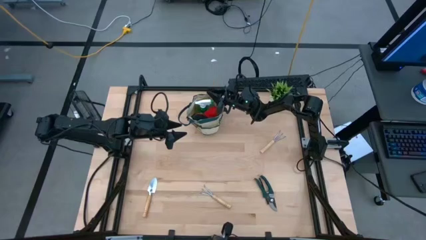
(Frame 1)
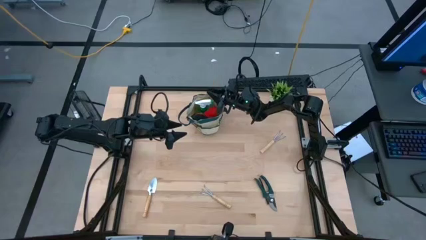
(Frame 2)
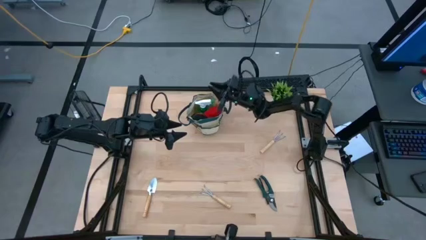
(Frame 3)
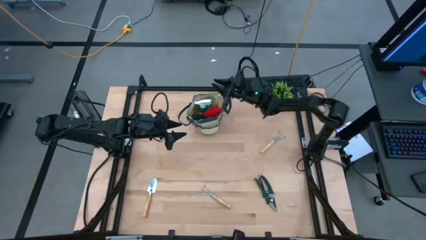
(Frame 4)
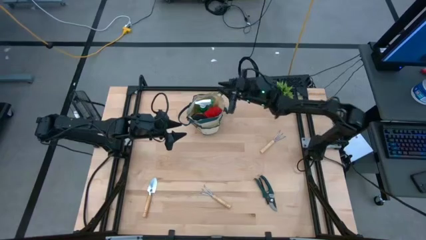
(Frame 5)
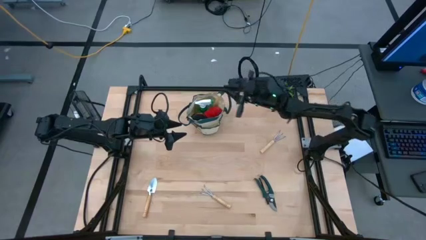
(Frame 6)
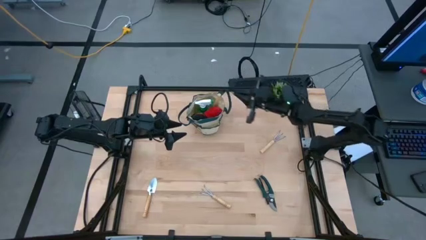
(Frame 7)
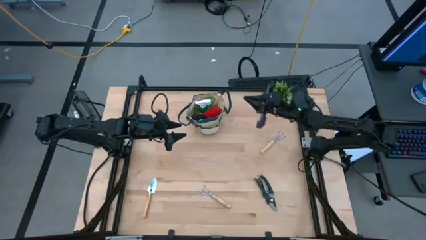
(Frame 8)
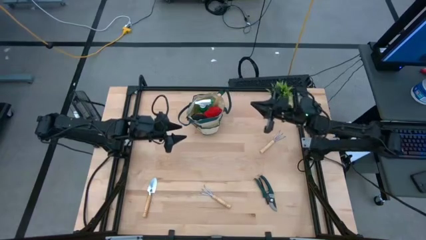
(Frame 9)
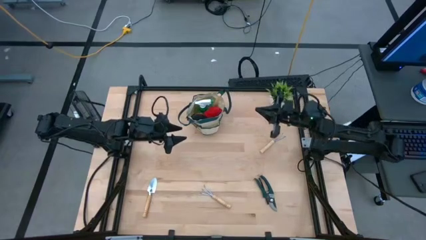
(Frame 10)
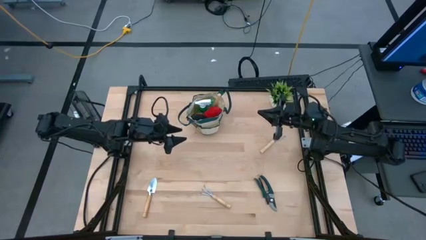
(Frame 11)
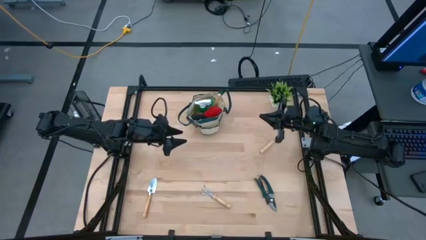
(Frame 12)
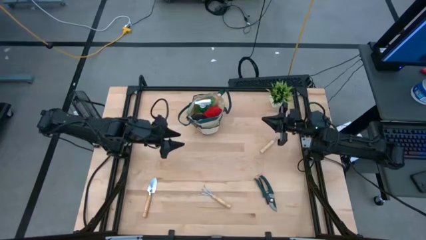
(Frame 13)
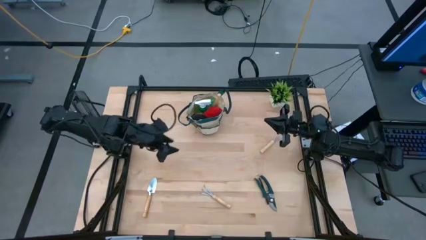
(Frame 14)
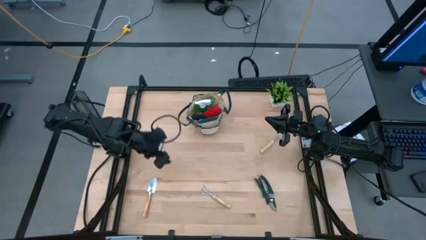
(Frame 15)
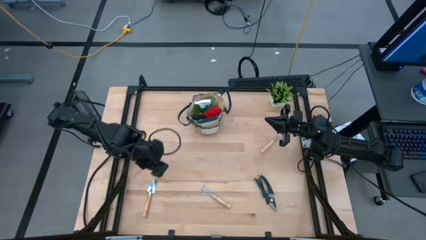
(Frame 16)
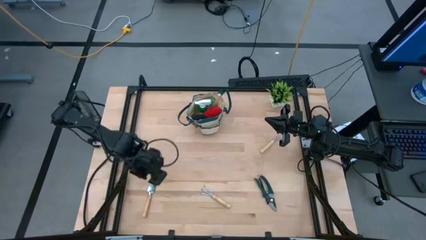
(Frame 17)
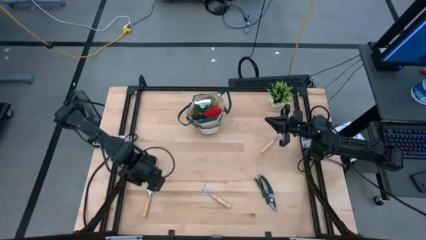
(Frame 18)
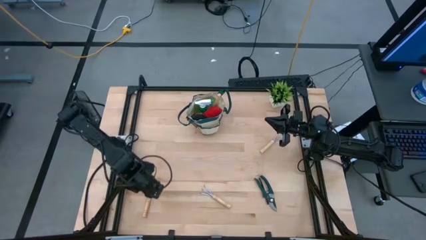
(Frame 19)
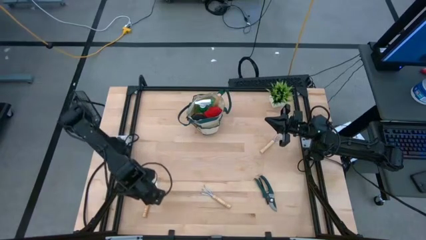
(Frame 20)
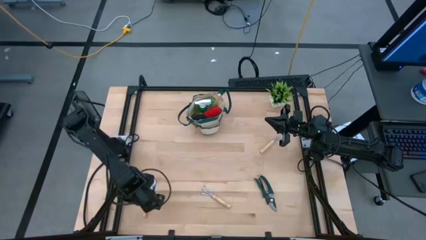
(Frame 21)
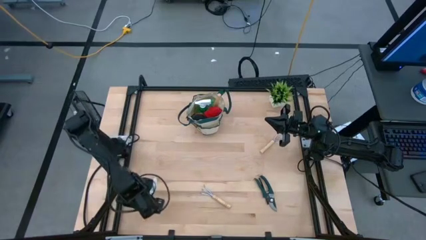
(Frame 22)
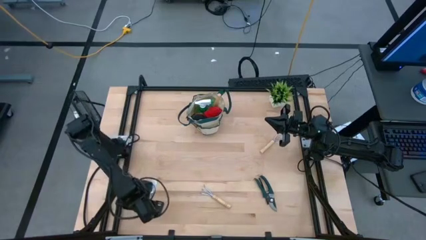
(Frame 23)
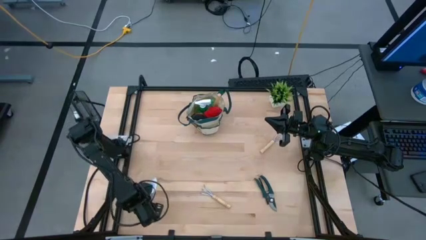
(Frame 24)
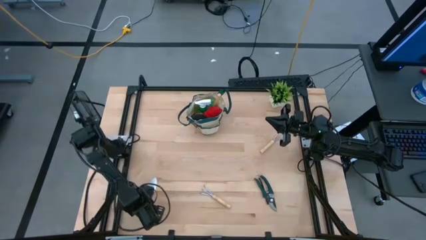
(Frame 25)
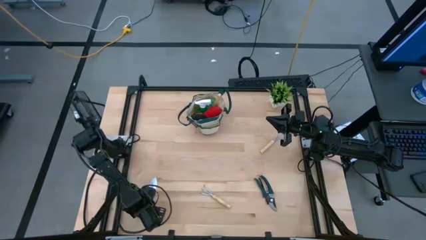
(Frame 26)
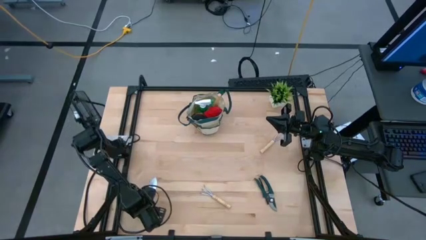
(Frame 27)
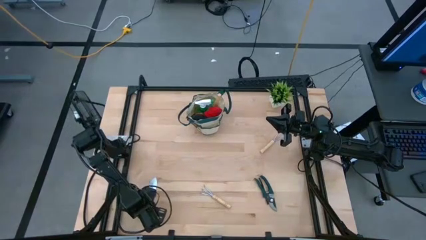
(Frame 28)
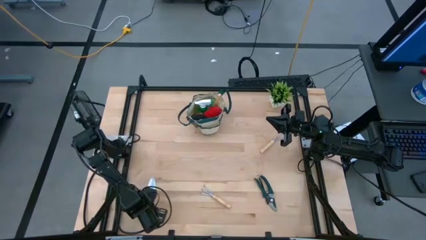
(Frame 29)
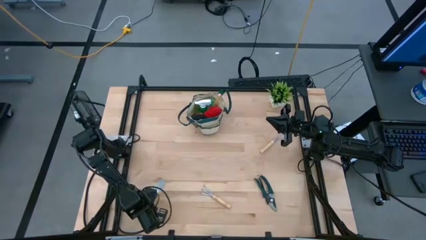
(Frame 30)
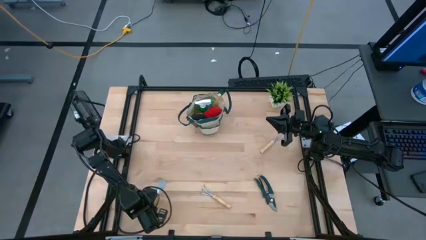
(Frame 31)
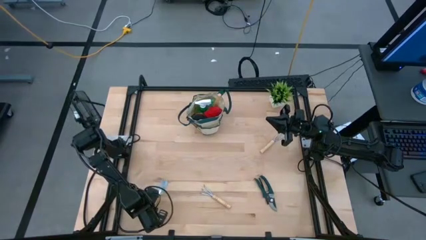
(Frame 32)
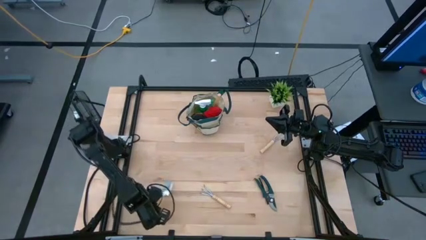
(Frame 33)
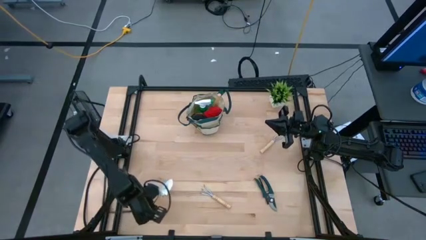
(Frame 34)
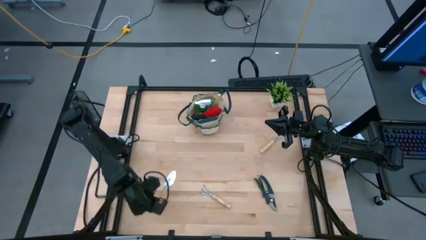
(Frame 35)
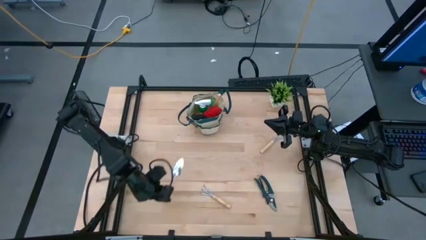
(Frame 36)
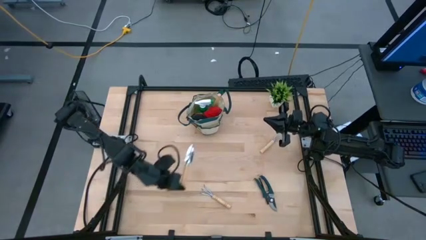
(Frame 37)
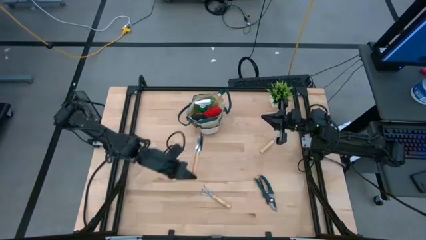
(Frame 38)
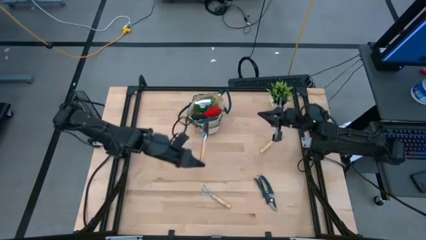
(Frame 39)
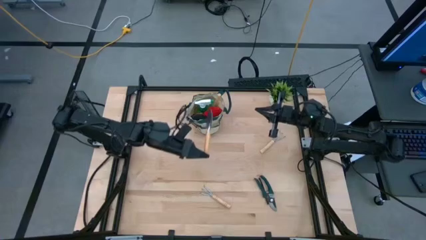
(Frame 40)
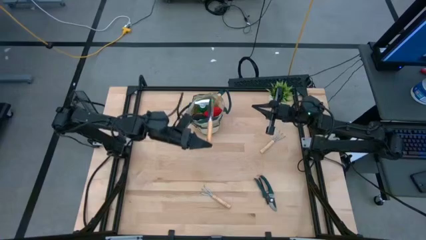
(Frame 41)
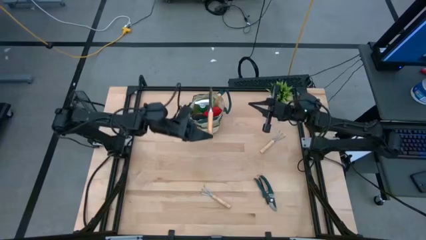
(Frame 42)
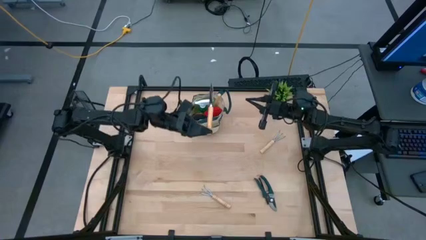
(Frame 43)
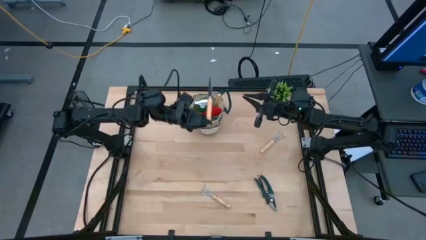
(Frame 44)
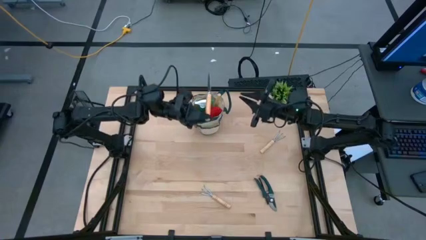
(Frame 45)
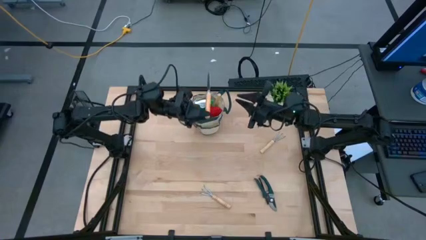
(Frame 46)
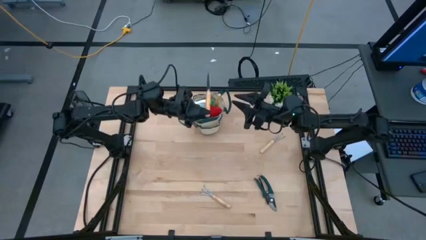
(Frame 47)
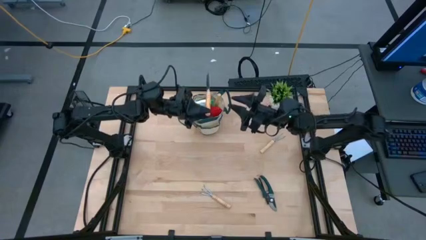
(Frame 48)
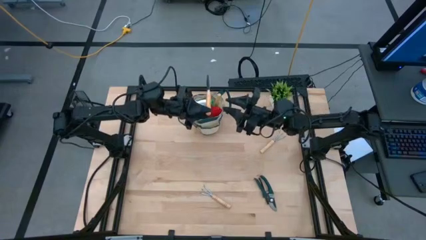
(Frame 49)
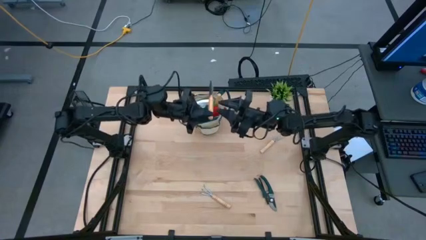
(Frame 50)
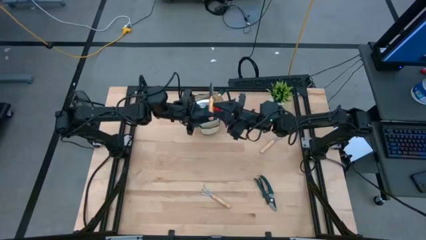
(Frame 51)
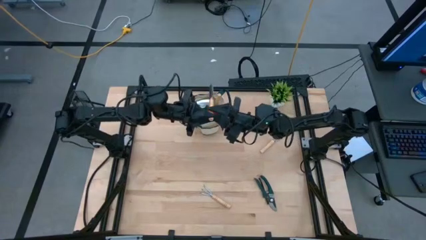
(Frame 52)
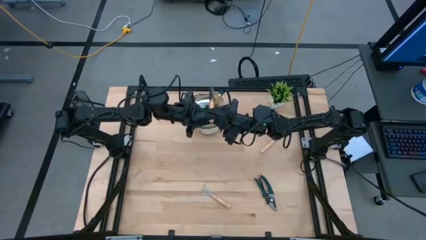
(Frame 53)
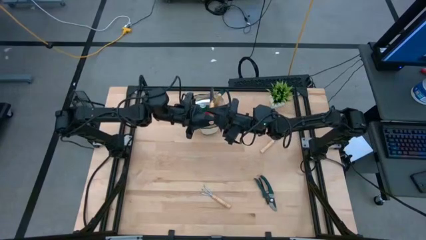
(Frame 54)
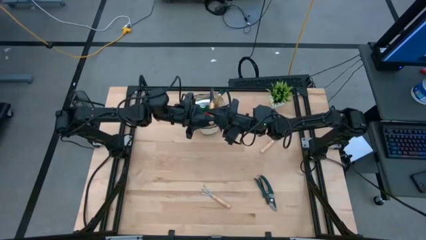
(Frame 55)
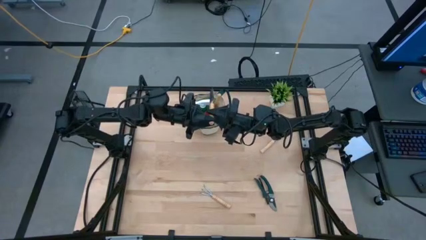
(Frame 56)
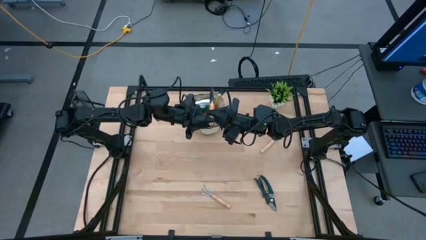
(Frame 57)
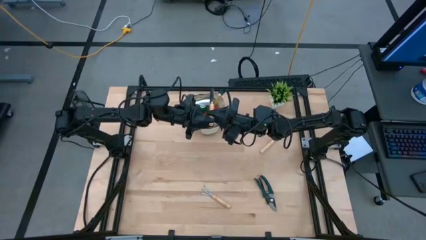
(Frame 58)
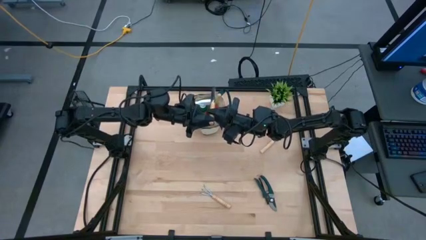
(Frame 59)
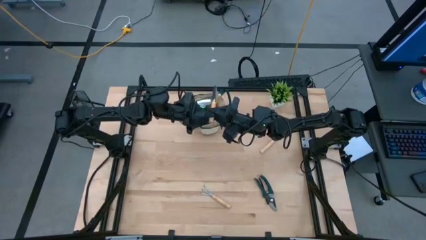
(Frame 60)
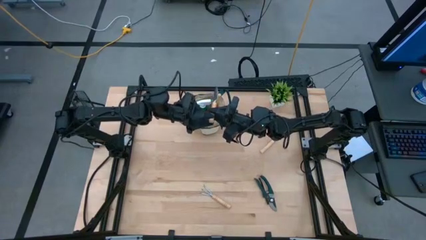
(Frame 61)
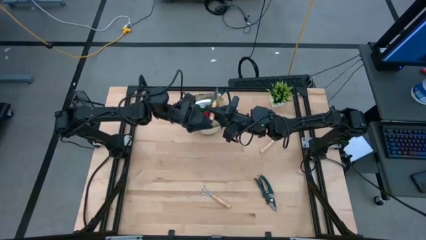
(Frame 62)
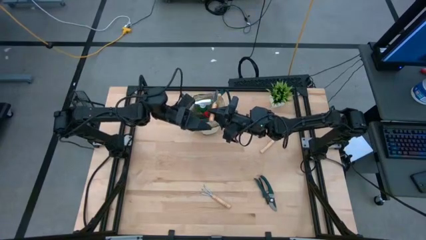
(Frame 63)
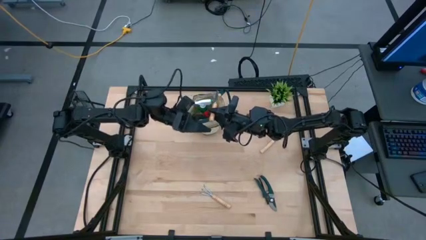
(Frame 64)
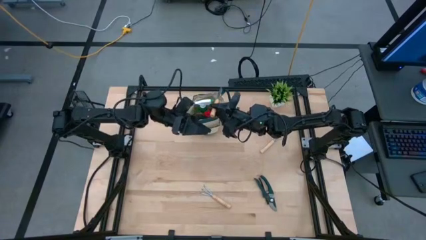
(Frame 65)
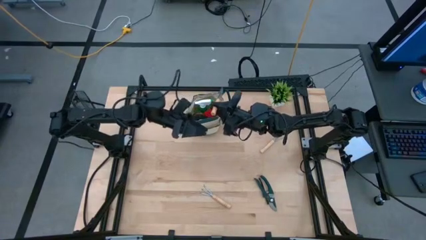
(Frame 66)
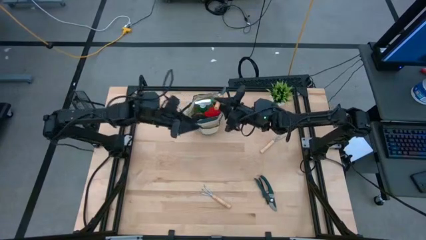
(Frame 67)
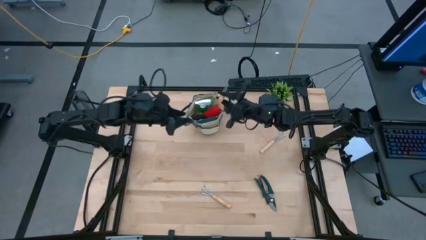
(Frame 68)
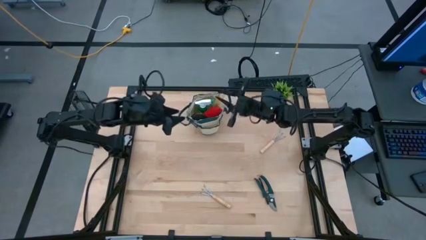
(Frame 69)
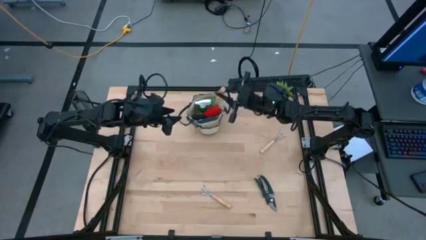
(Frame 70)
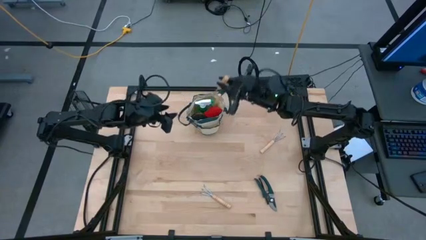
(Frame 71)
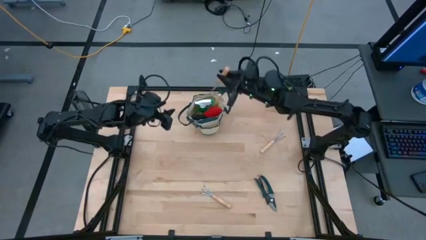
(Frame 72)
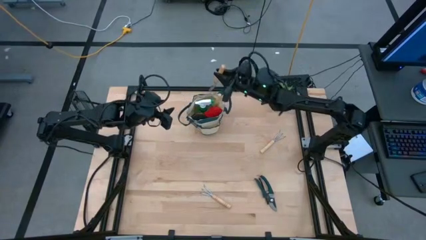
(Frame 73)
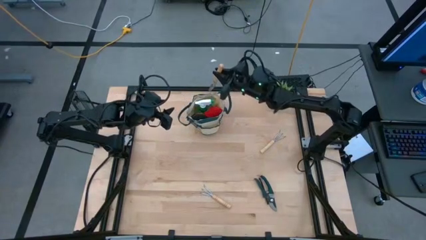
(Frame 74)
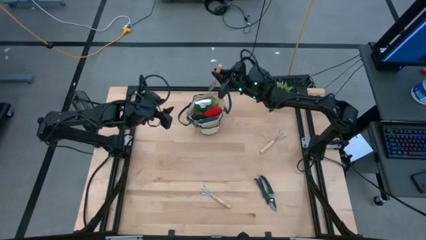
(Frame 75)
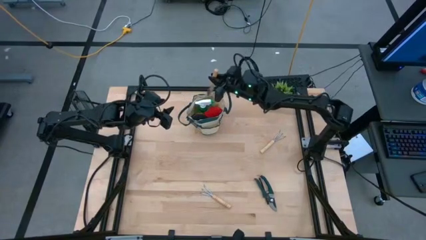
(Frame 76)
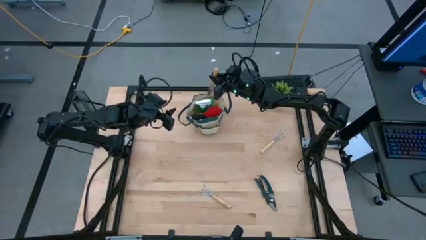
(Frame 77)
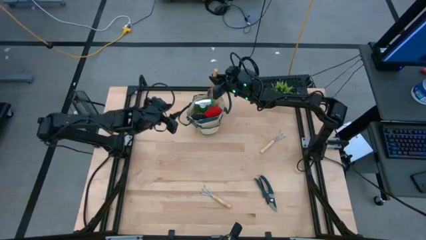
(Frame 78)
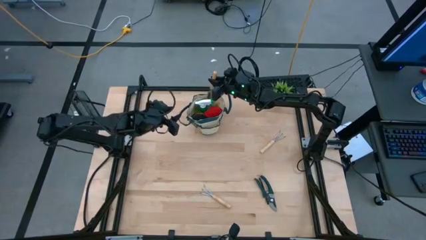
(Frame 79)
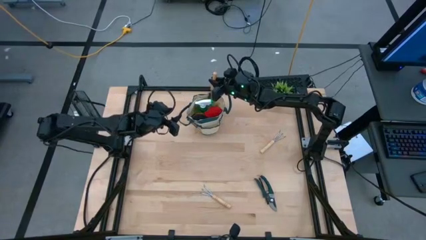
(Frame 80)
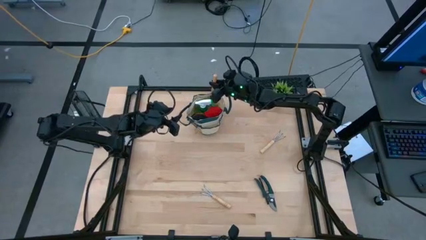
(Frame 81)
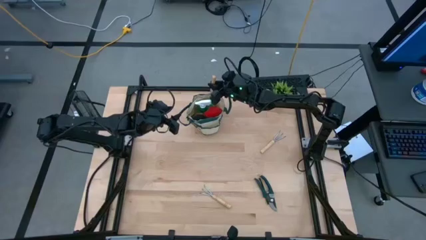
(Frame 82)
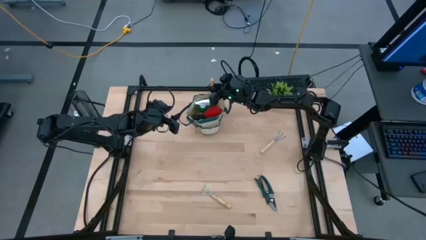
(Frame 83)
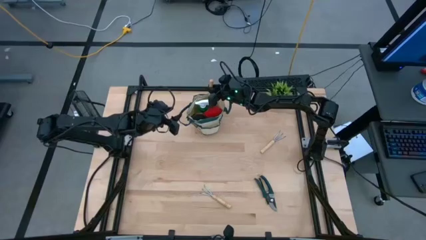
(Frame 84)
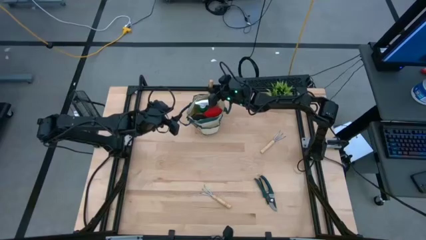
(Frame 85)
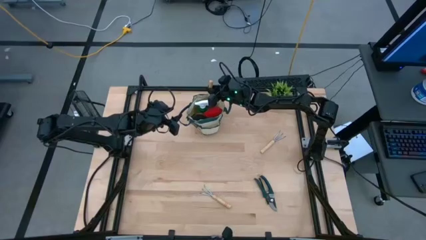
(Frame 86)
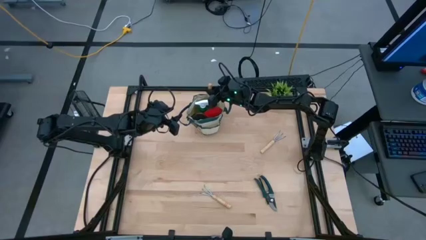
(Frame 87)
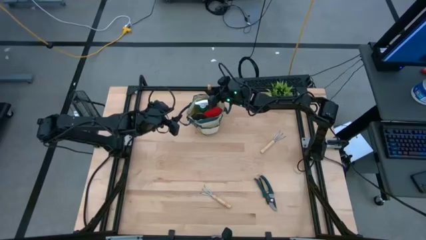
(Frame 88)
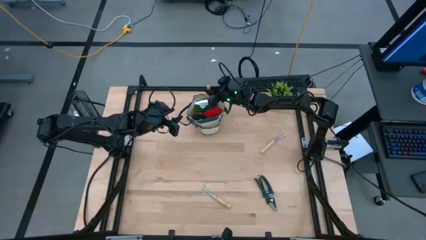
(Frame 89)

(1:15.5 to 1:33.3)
Task: Pick & Place Garden tools in Gardening bag
Put the trowel into the gardening bag
